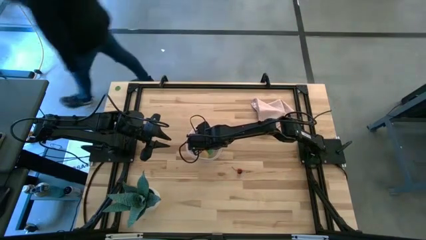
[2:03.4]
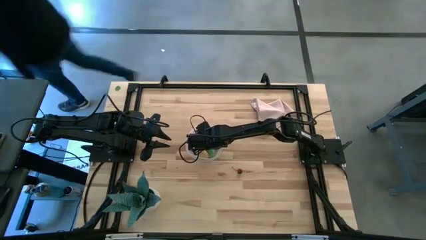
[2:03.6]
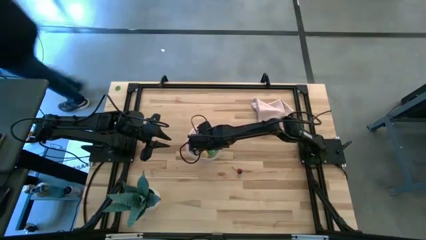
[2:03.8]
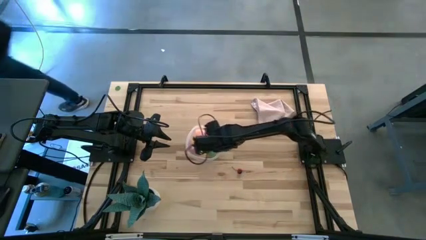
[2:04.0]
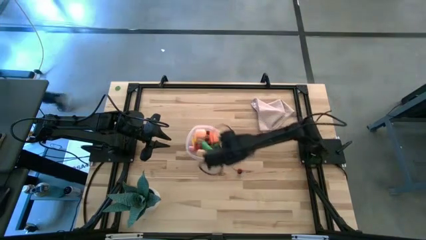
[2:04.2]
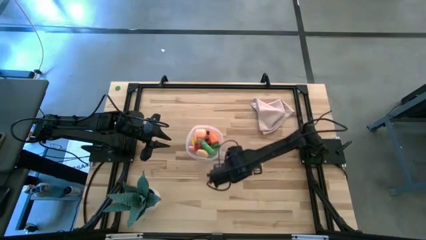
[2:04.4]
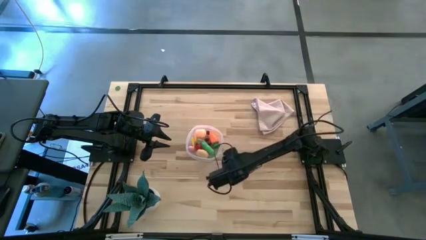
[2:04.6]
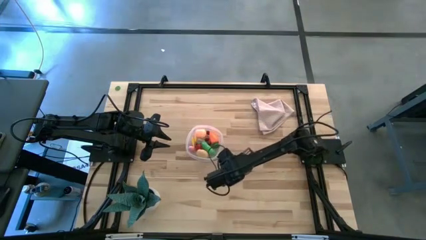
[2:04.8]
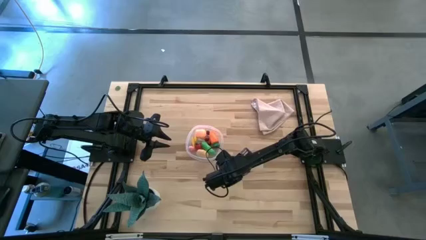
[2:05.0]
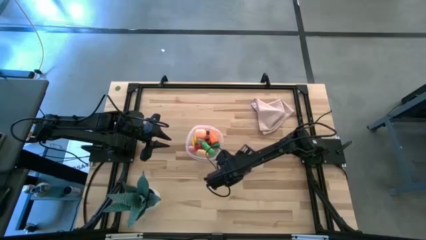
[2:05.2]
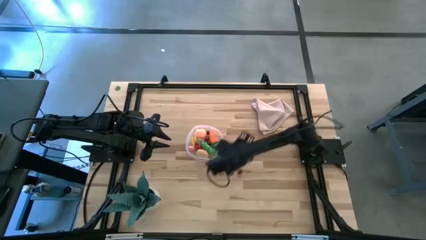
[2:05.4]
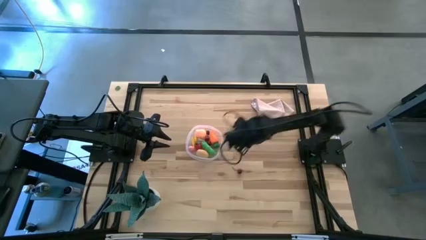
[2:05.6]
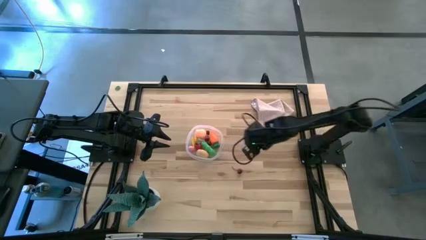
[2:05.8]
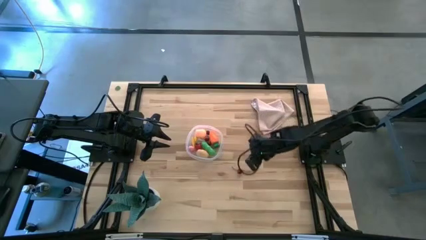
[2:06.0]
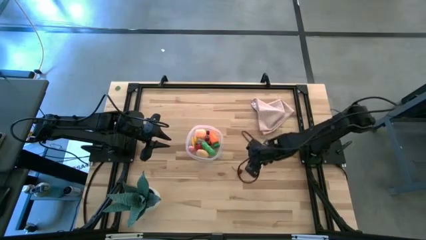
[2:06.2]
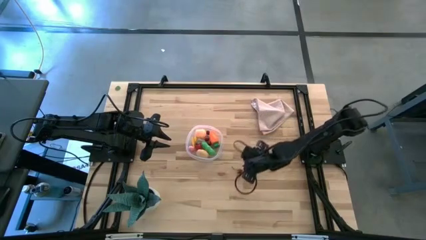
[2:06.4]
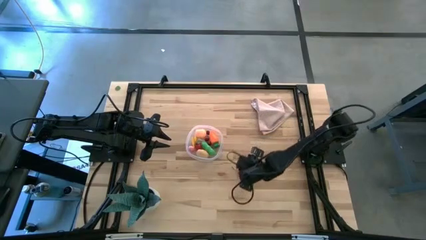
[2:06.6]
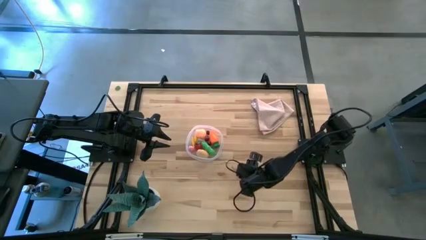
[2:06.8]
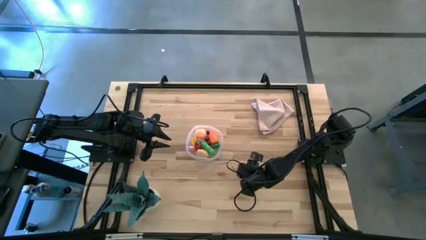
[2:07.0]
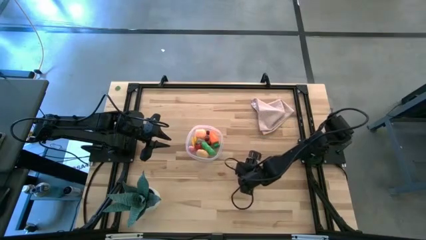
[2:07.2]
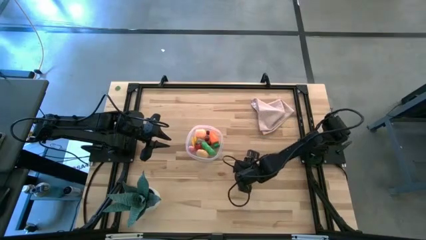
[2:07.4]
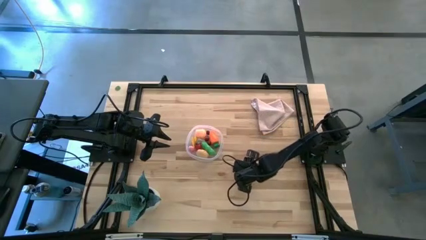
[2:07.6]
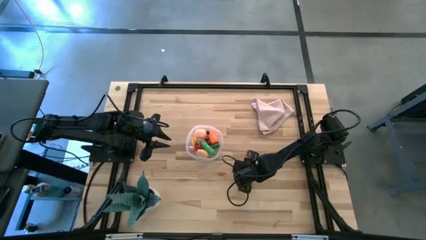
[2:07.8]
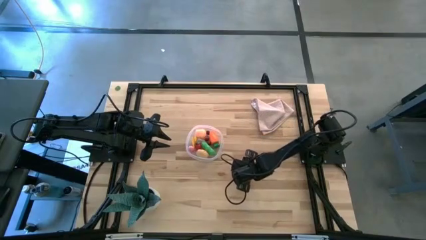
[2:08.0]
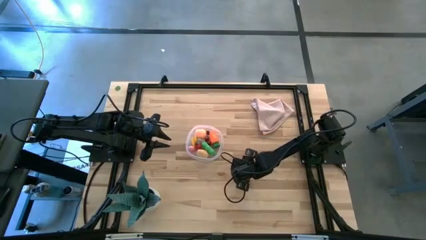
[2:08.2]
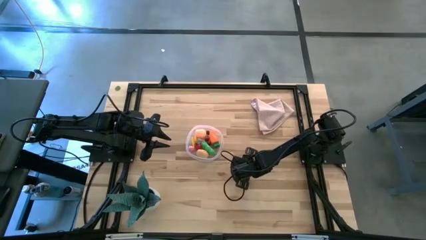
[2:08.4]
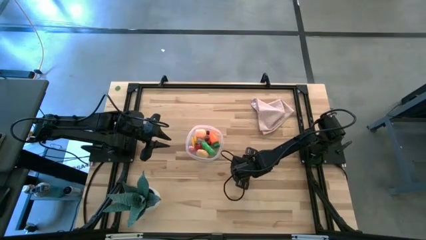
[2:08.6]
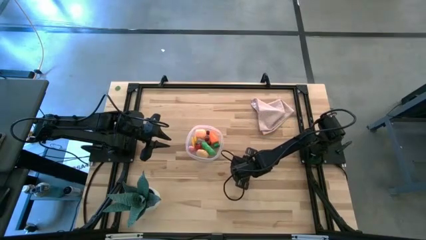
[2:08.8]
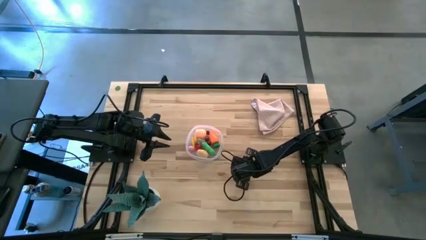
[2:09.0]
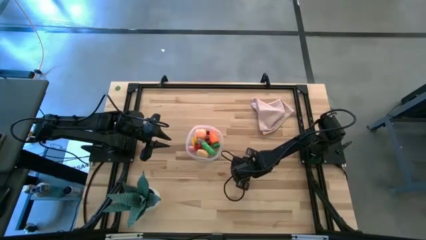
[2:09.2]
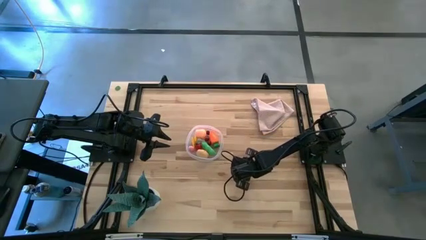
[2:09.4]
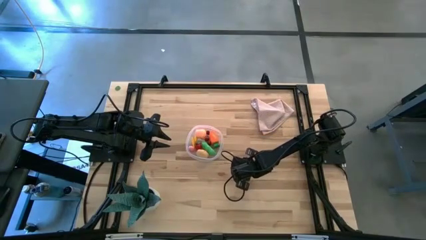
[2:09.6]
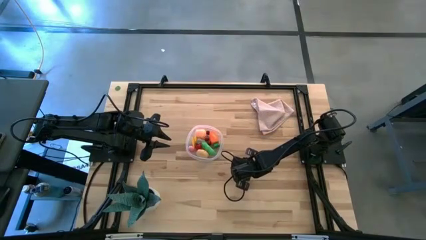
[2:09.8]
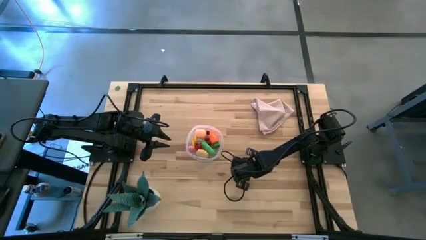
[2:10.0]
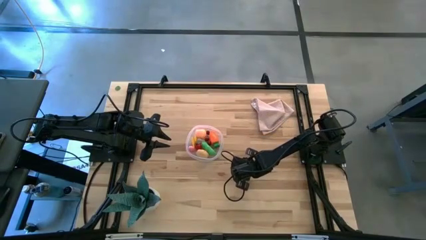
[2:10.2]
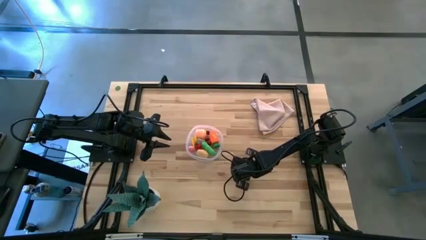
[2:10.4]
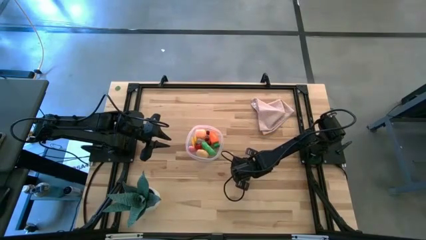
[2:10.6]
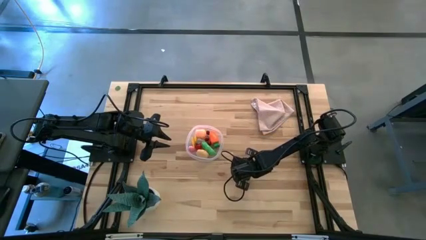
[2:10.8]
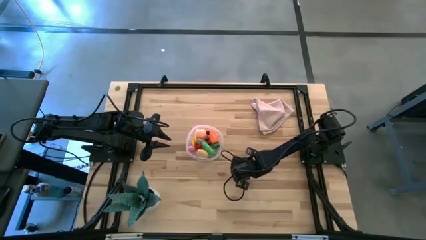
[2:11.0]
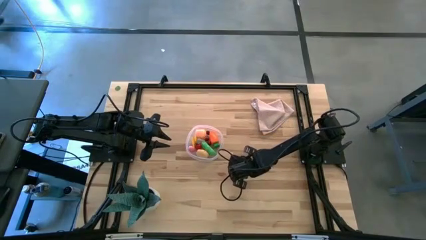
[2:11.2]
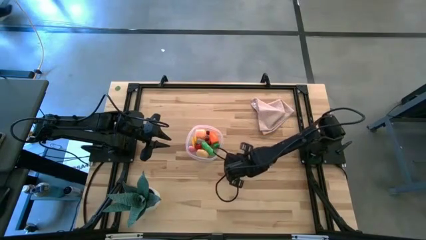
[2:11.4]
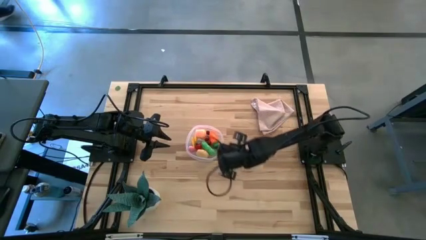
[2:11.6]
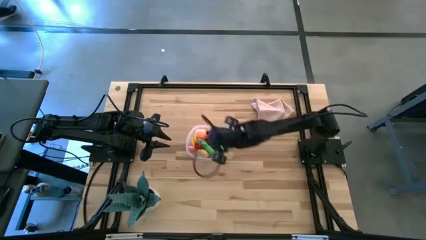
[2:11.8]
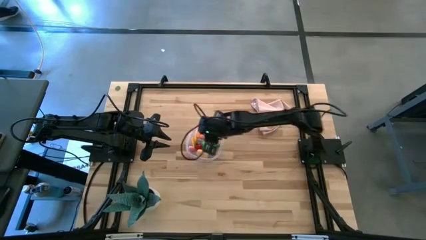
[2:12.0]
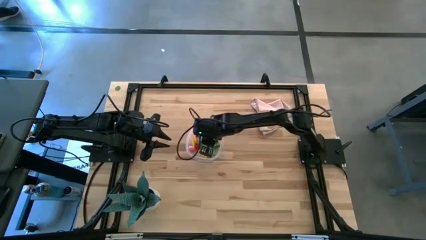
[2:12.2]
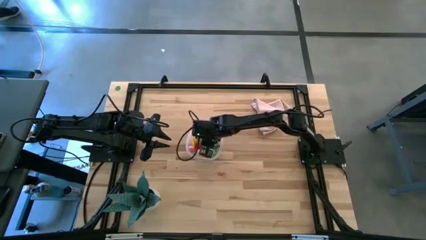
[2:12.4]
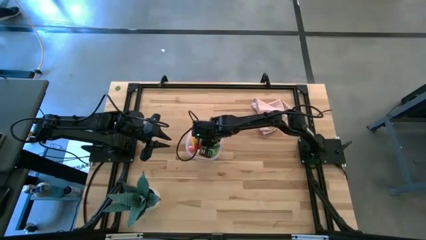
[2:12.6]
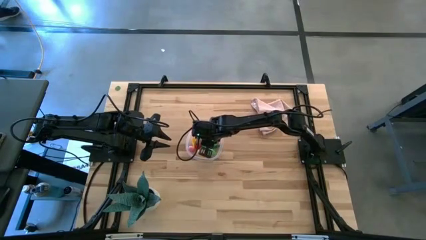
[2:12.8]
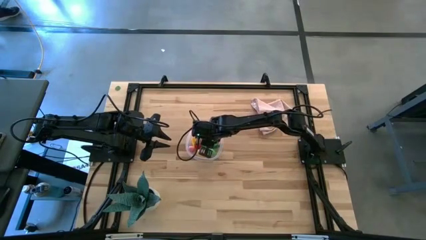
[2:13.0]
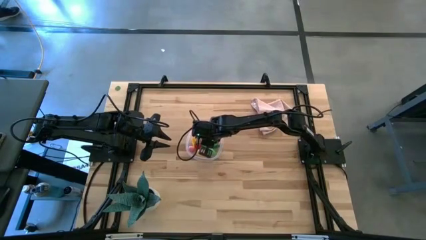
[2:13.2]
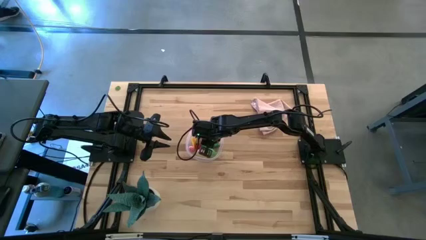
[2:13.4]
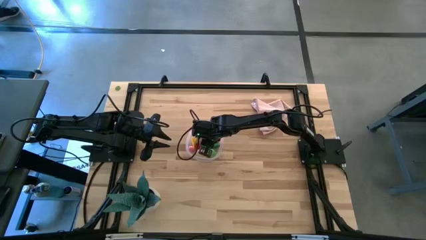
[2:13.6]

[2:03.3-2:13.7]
Task: Pick and placing Produce into tupperware
Put the cherry into the transparent bin

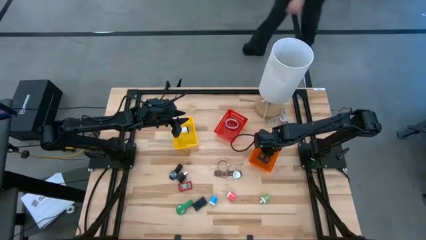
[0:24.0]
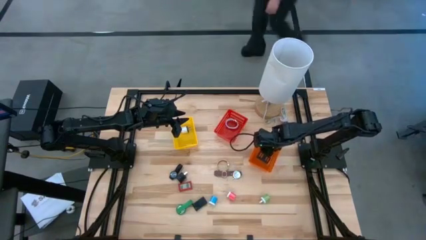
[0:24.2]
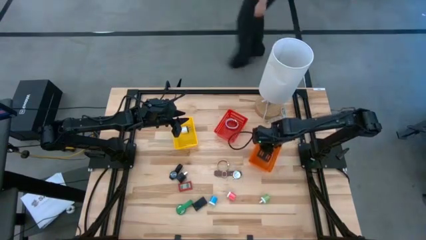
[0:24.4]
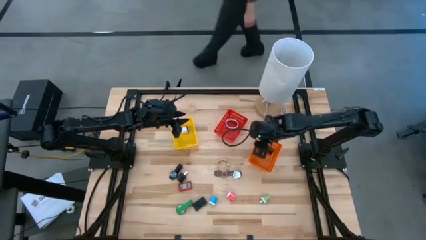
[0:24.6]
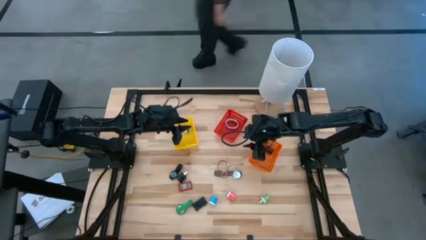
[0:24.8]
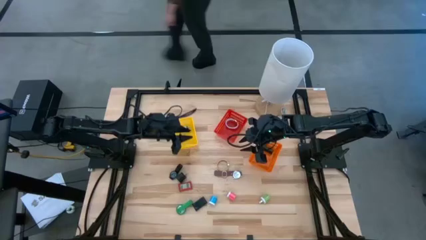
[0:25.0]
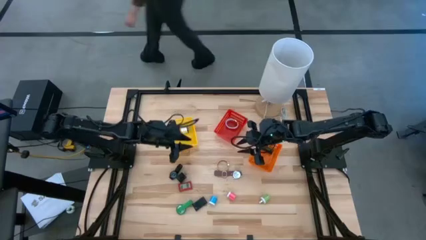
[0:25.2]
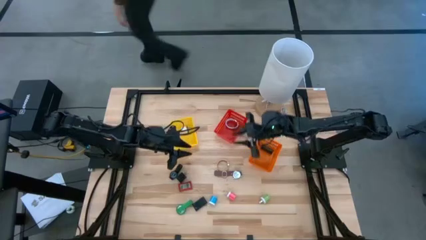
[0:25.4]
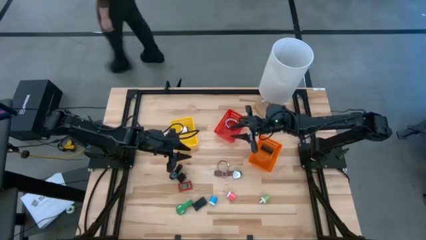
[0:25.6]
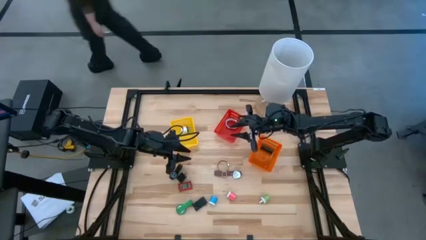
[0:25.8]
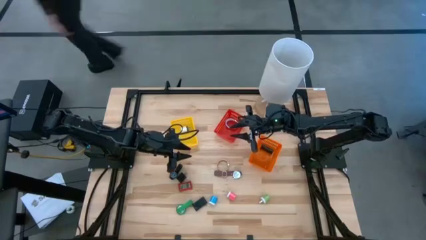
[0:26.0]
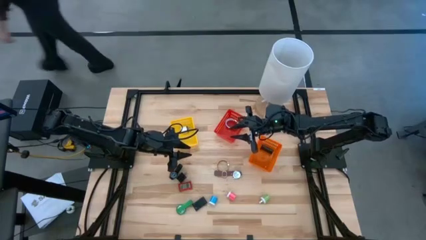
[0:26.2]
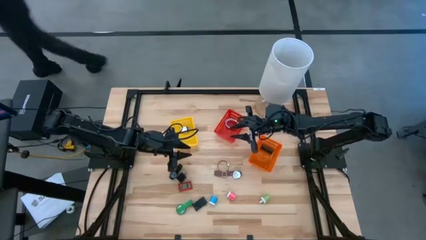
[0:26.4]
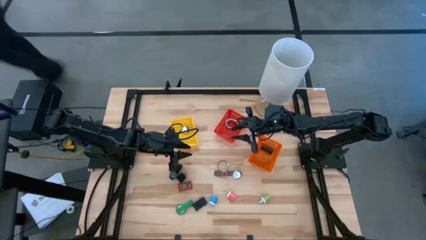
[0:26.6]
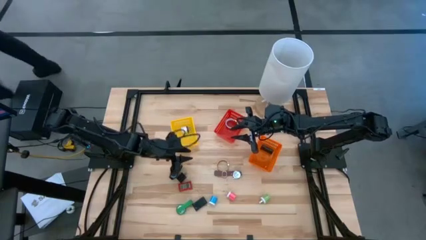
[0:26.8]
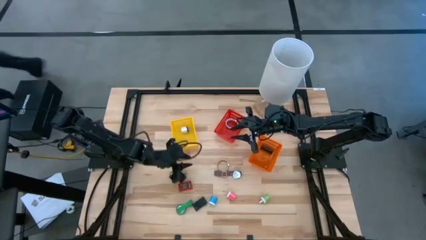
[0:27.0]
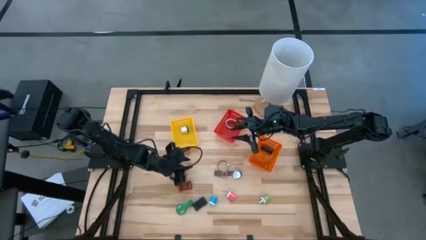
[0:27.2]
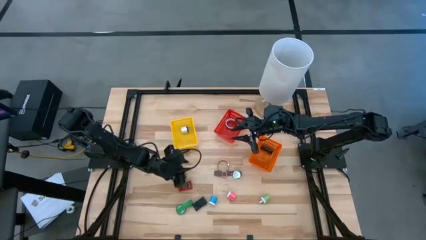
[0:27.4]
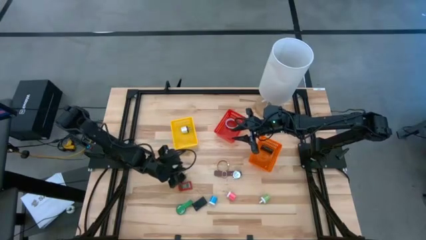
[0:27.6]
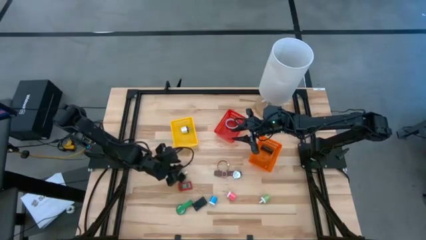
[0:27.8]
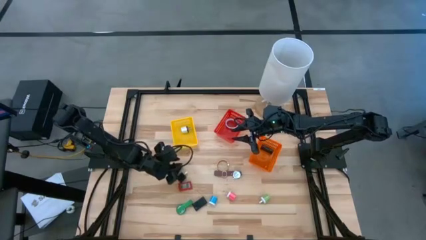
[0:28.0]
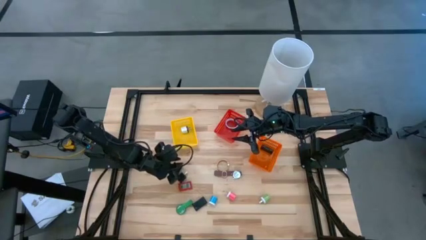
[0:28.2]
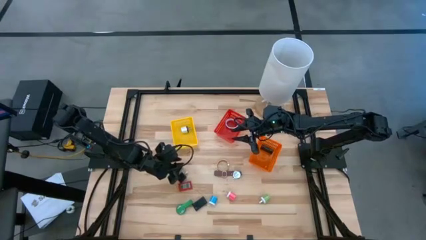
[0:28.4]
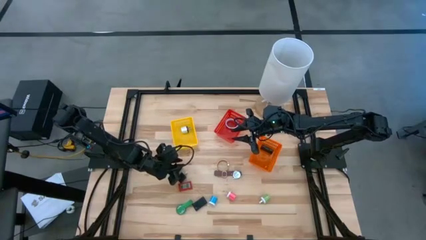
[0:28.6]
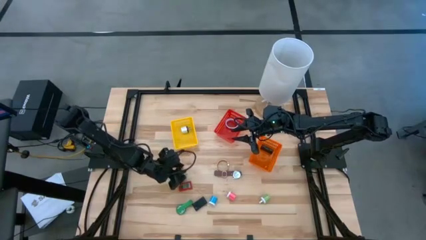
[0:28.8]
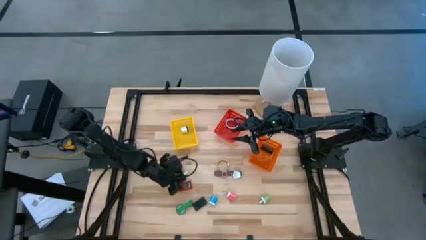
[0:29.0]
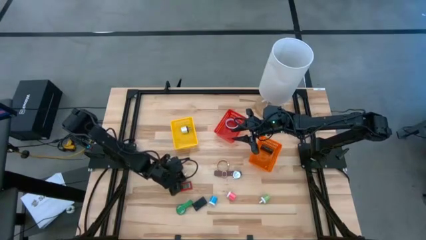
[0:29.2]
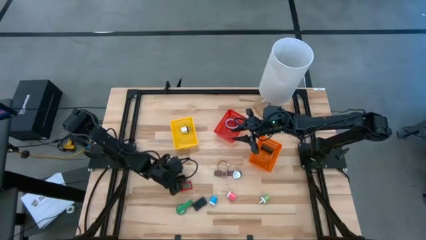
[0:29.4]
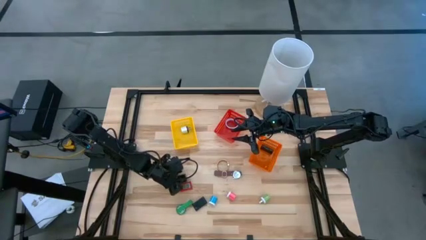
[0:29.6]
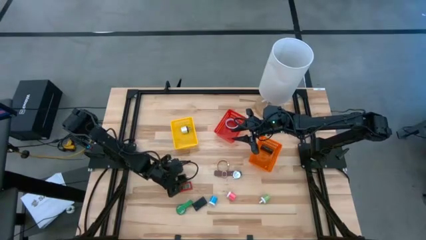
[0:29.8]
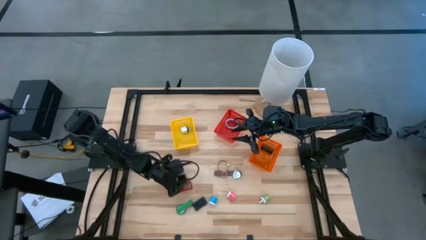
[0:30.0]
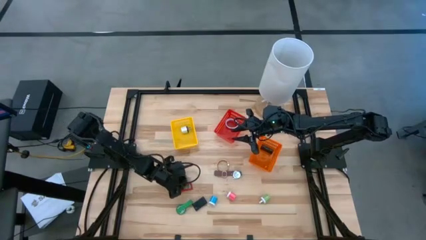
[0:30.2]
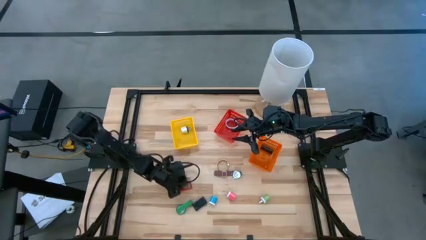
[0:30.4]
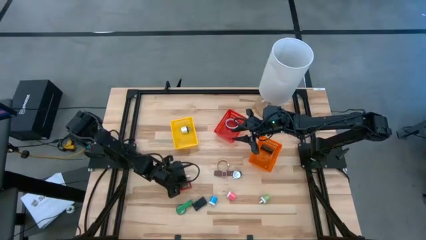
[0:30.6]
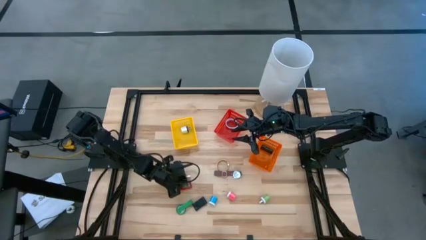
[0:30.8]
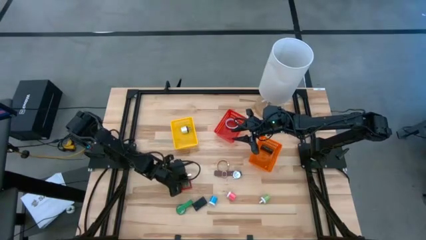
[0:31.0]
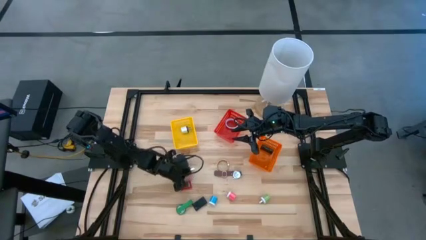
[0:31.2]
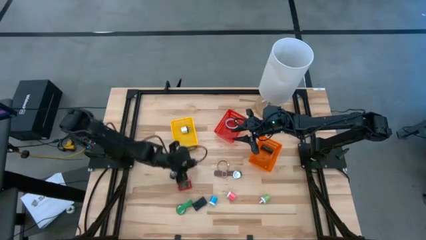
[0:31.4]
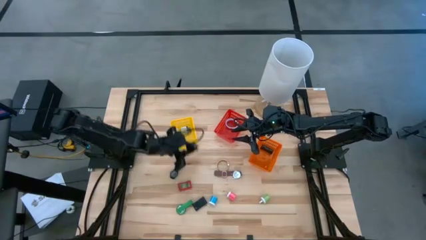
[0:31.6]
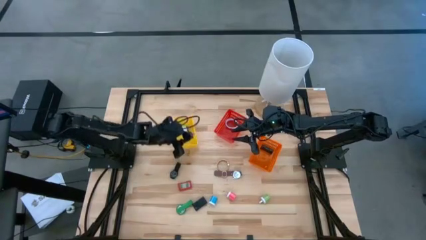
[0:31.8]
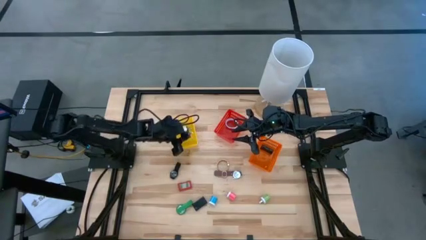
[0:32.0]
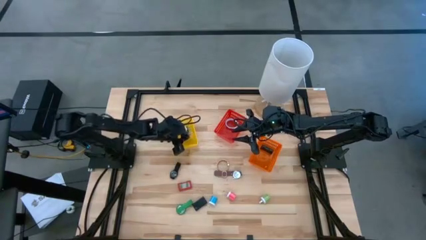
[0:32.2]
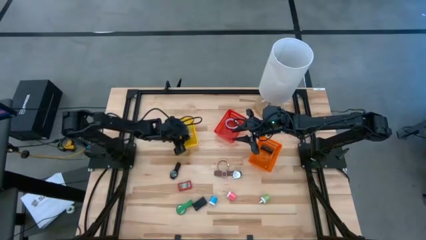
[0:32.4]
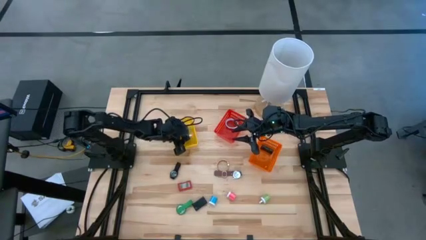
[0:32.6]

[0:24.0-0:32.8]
Task: Pick & Place Office items
Put the black adapter into the yellow basket
